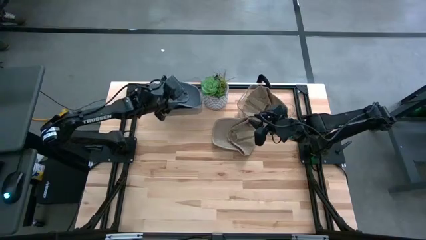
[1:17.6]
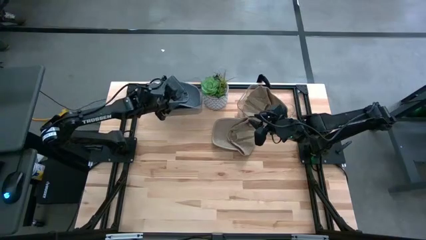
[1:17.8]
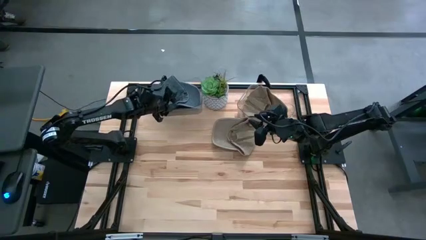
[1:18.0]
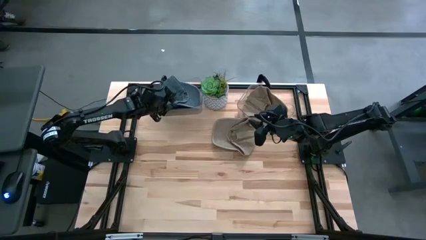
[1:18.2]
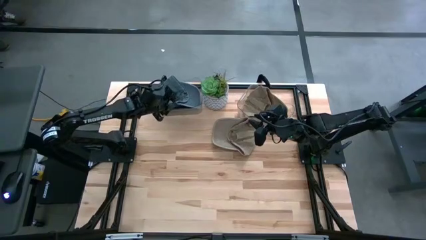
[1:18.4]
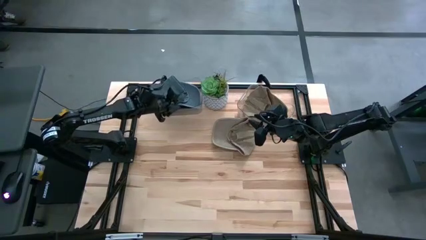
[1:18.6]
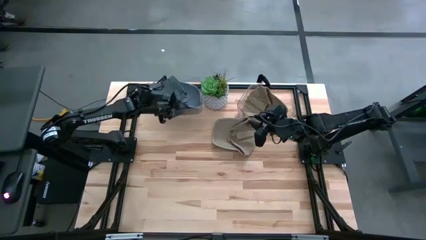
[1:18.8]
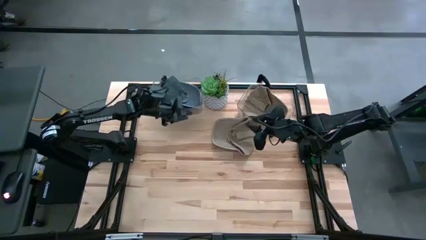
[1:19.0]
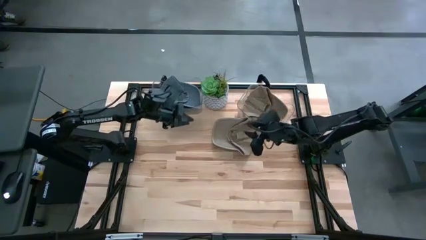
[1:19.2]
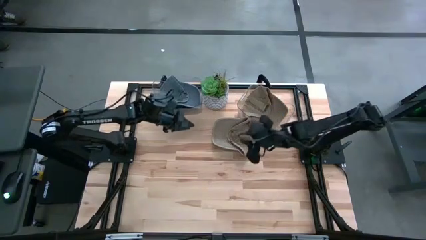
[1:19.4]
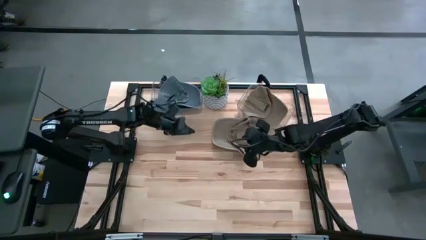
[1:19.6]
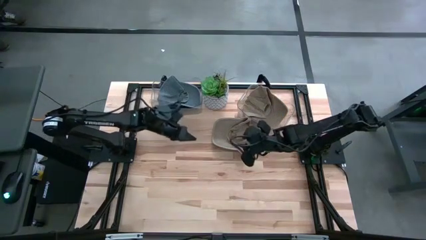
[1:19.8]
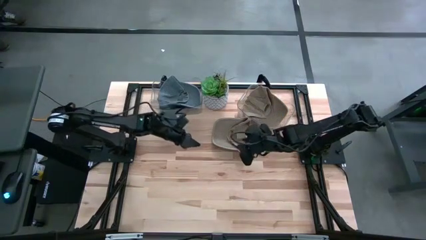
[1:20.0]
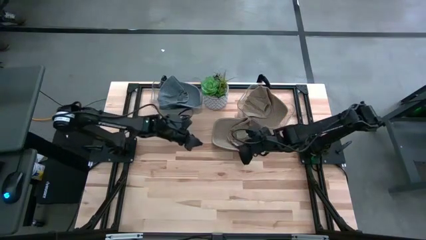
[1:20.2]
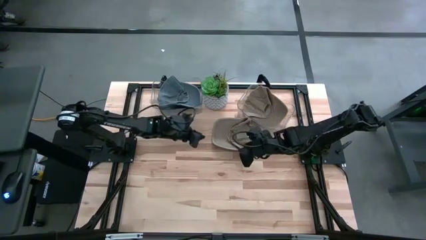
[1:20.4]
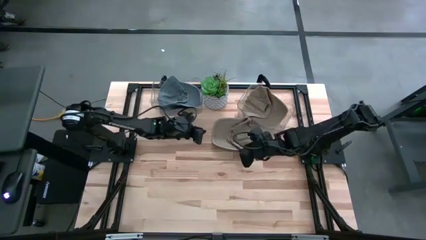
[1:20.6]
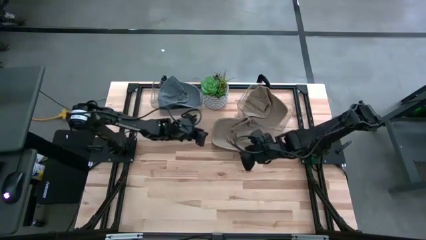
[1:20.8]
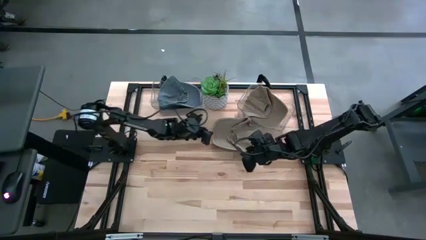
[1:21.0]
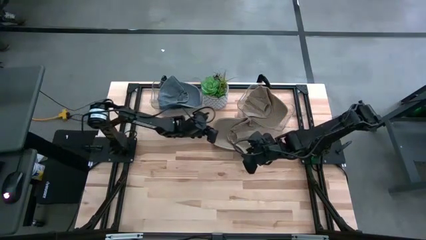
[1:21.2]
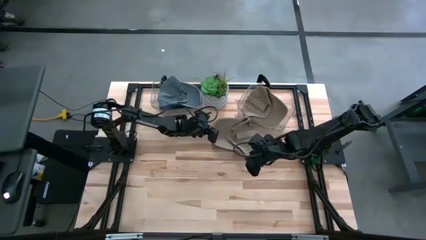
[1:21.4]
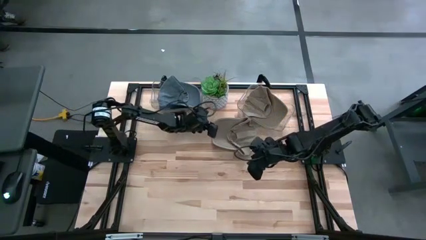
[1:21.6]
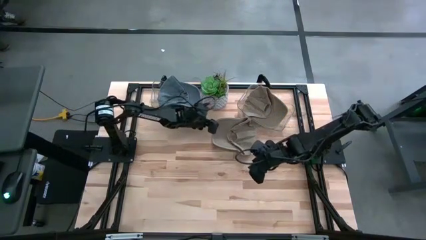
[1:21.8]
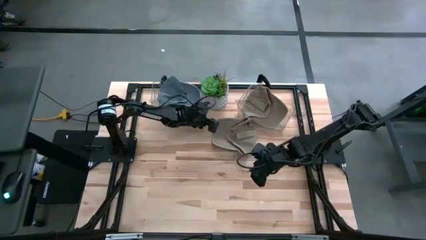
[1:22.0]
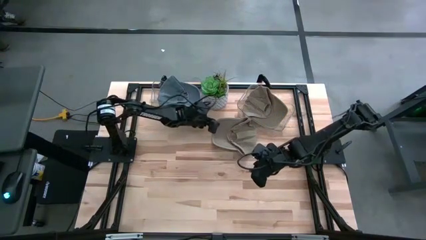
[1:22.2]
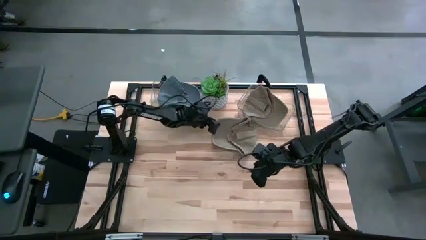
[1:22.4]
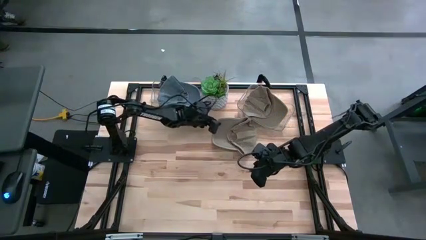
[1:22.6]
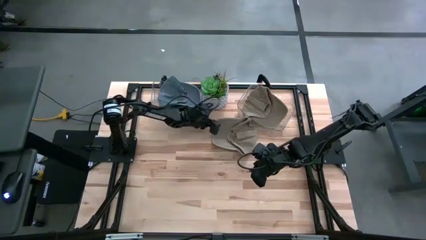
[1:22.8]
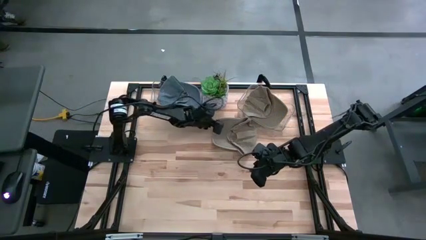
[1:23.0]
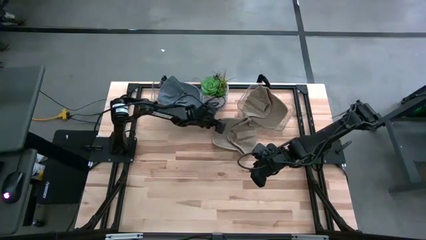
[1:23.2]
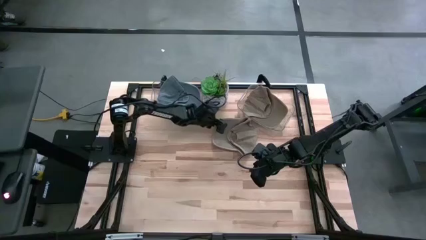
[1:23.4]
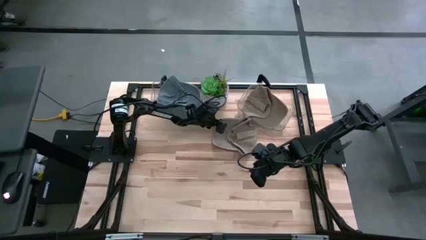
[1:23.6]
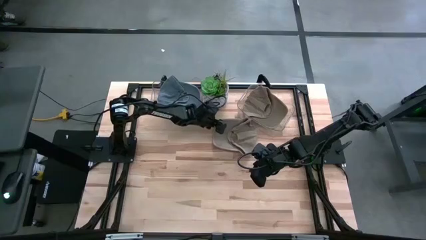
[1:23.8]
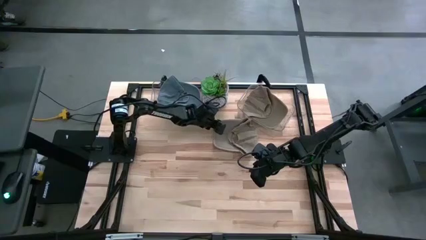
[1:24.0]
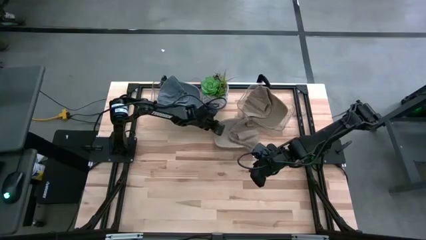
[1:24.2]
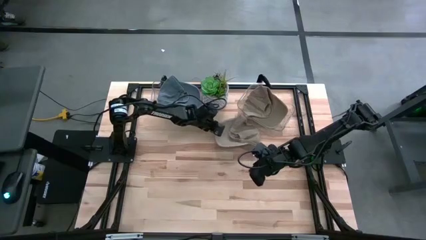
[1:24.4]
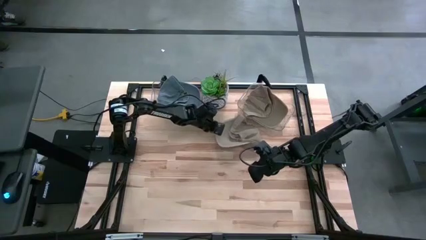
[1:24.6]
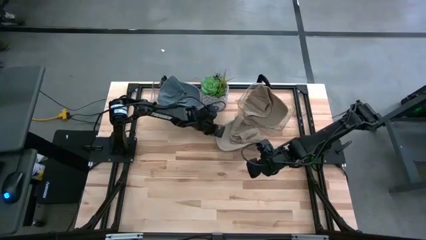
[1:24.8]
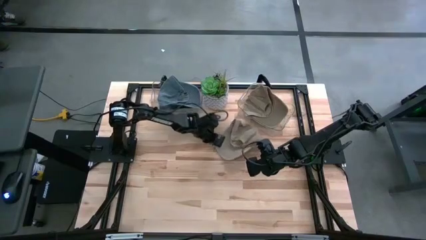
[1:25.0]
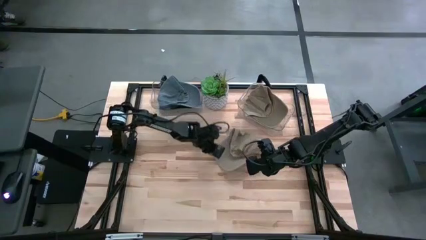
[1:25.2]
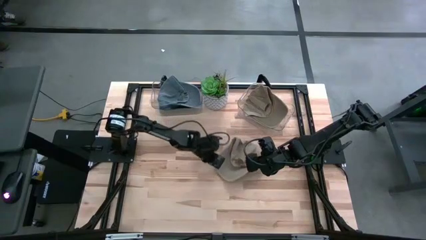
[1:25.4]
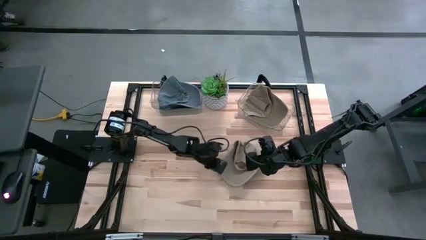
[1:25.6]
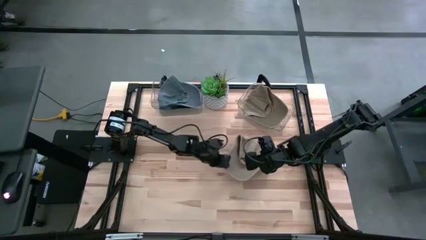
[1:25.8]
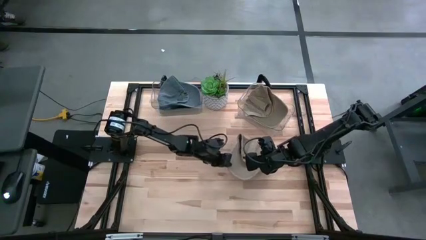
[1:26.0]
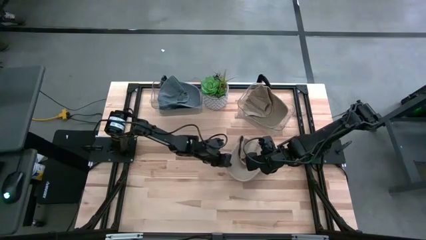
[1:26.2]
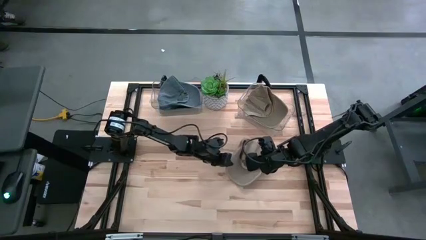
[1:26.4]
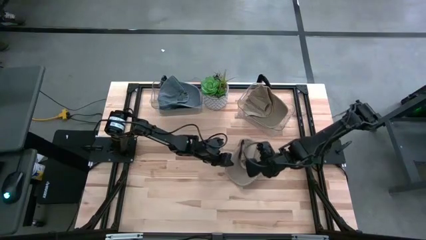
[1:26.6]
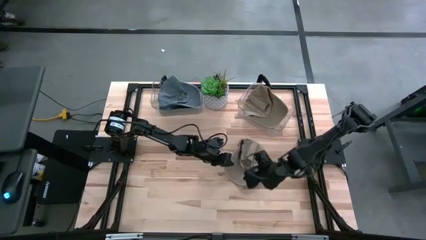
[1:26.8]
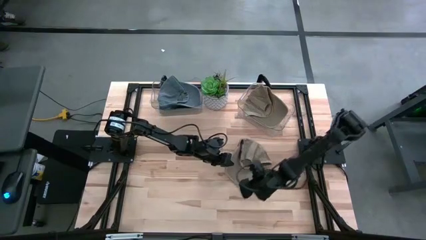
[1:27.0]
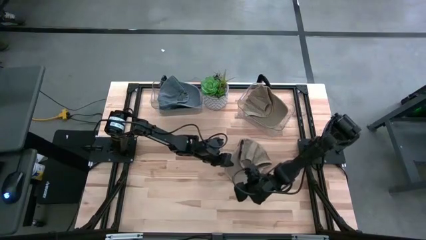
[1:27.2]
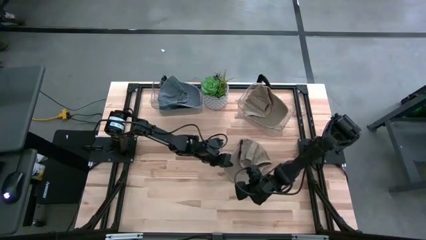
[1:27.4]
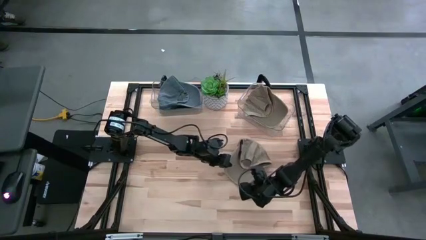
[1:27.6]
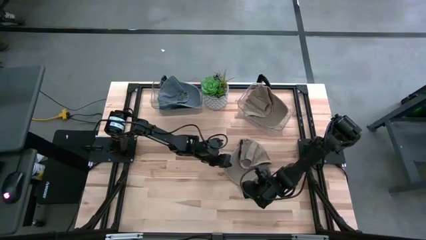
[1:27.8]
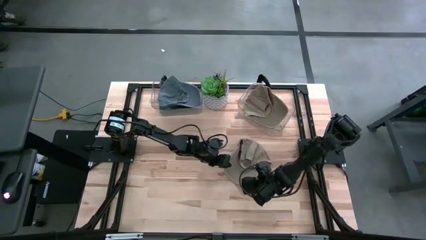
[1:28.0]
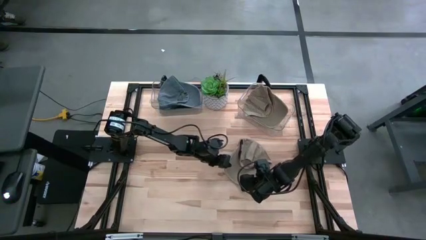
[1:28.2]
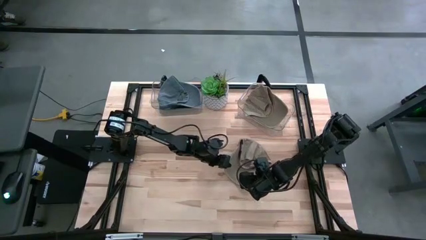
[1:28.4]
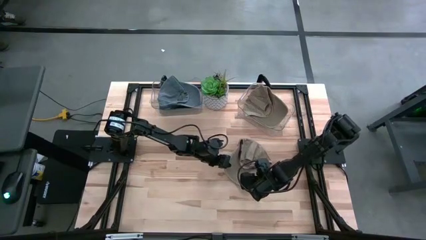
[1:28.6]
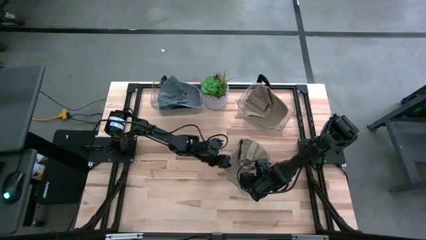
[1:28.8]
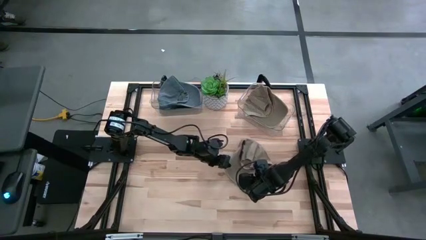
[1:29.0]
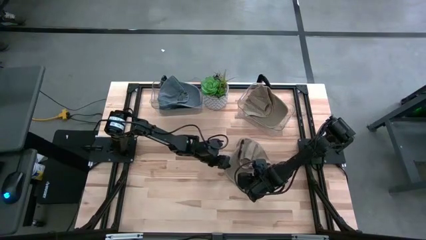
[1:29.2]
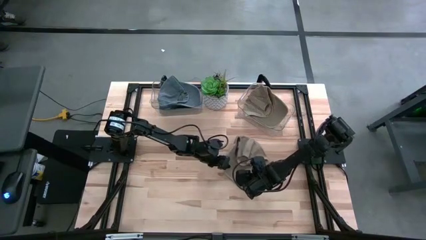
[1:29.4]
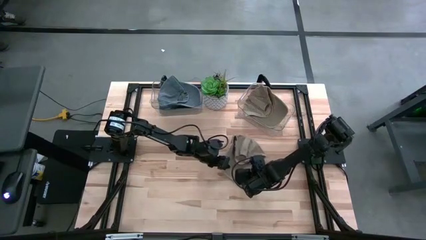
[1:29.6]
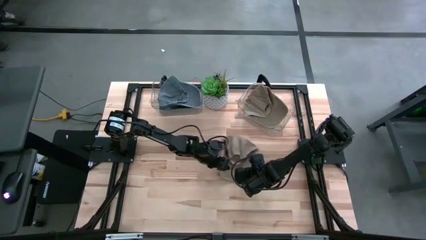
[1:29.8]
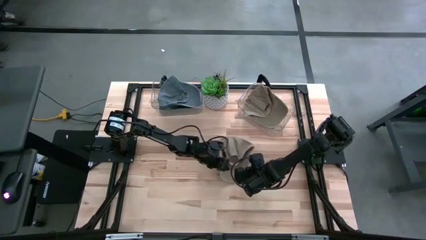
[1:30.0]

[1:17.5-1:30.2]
Task: Pick & Place hat
Put the light brown cap into the right transparent bin

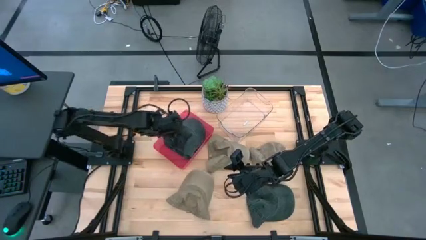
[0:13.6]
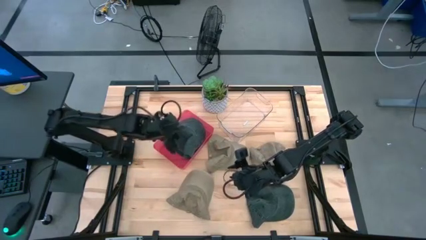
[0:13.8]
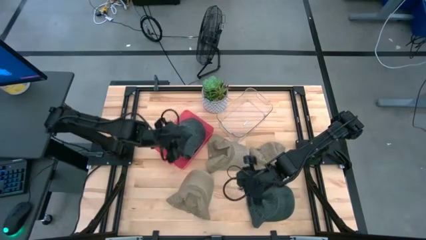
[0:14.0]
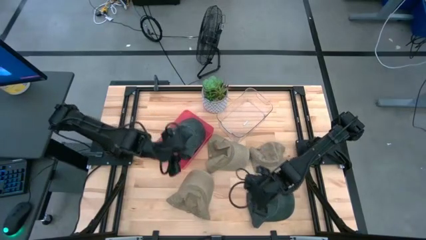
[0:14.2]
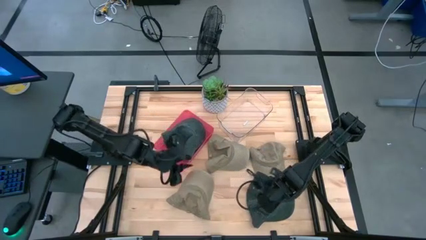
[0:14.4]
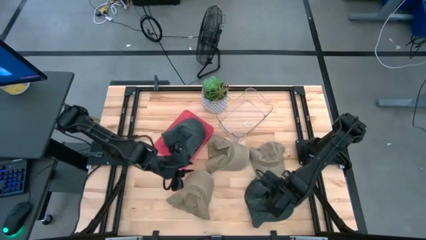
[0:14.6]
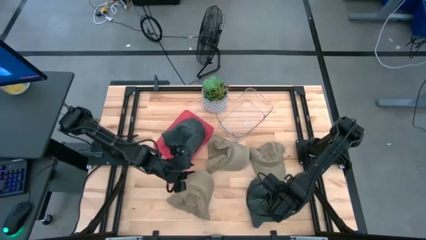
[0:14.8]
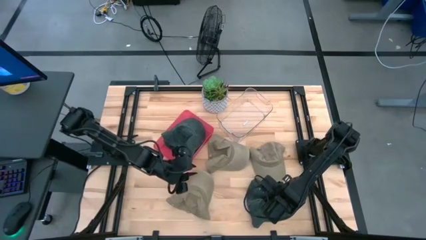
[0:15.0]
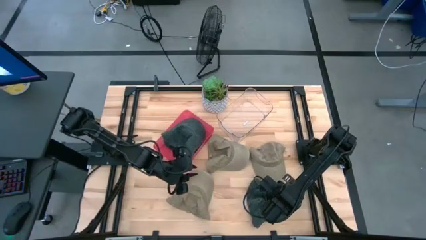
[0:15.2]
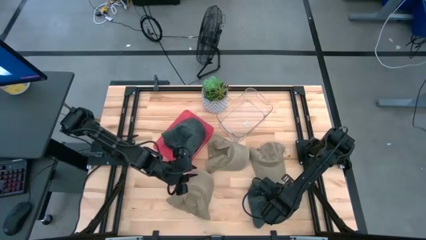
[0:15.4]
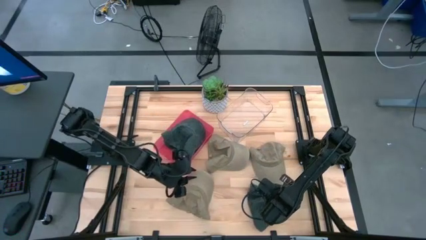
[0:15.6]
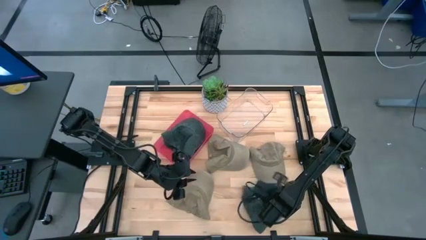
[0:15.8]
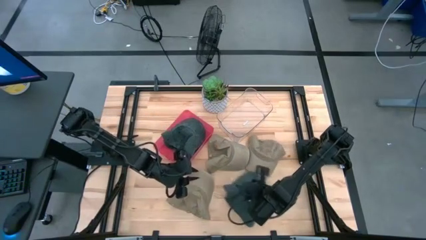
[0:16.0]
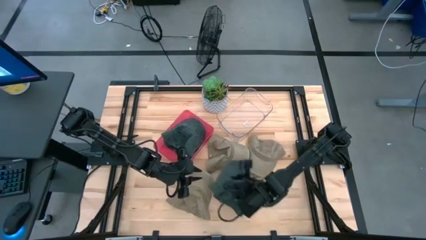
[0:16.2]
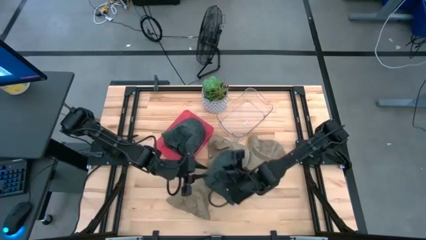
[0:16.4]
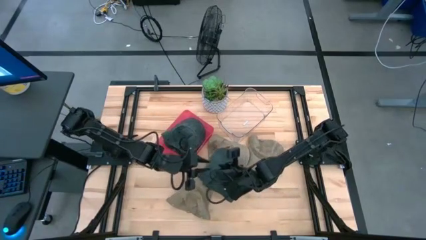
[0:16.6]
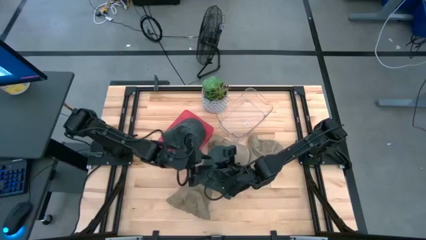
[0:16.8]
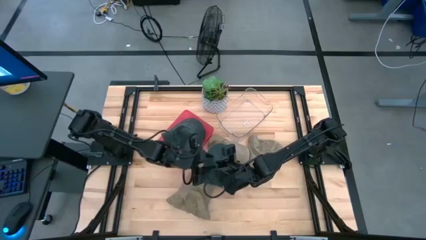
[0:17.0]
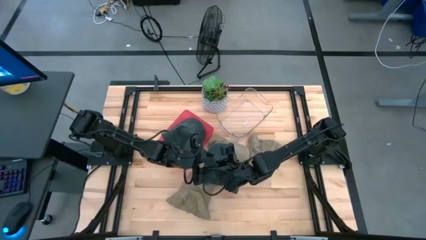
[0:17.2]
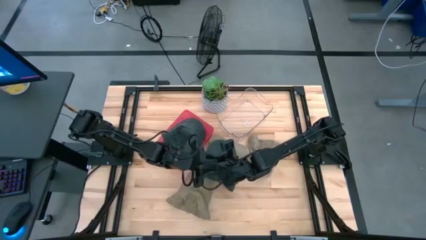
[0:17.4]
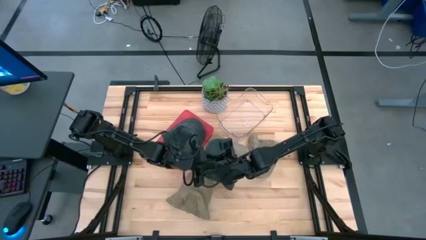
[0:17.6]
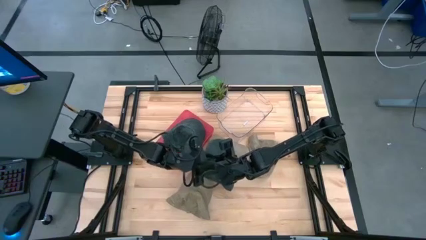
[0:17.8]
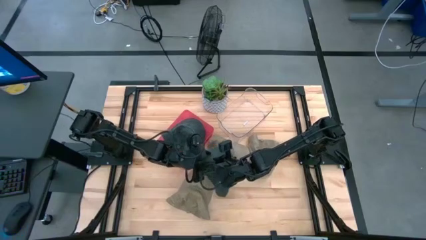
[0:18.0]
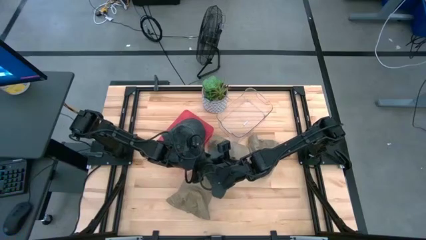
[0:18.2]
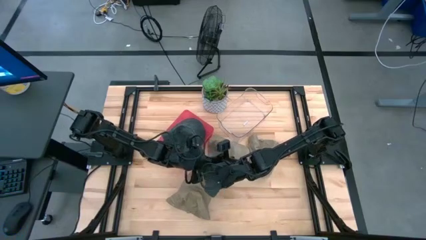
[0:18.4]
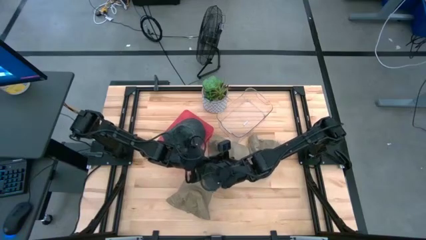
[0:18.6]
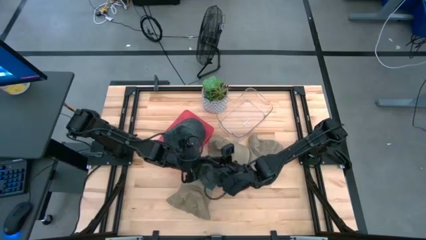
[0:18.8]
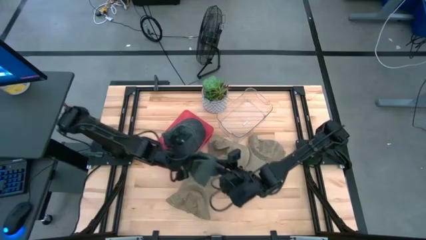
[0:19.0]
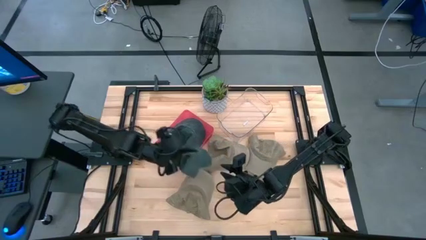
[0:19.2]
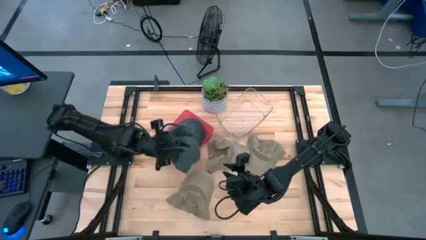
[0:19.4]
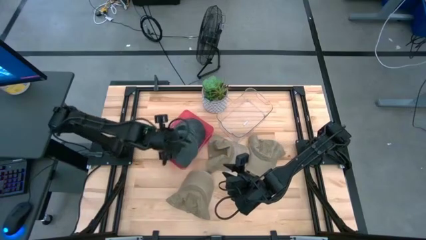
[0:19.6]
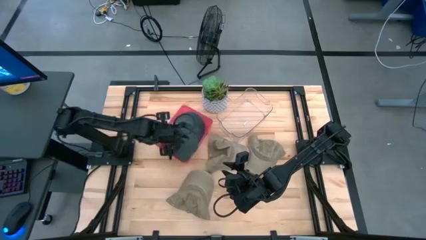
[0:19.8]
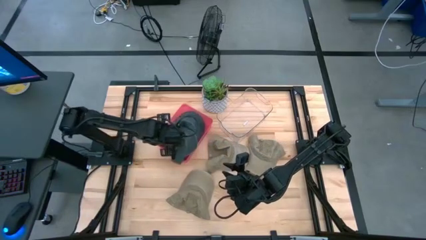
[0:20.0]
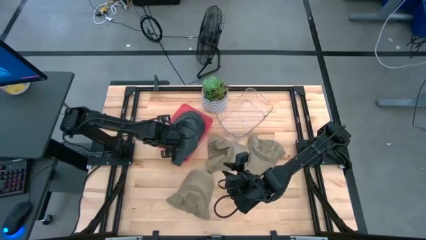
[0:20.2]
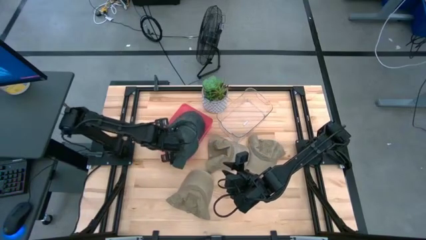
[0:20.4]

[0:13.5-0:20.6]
Task: Pick & Place hat
Put the blue cap into the red bin
